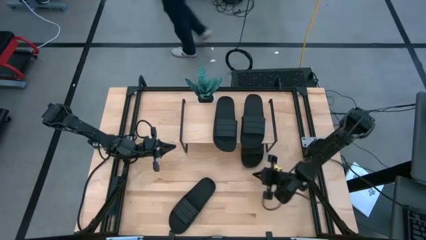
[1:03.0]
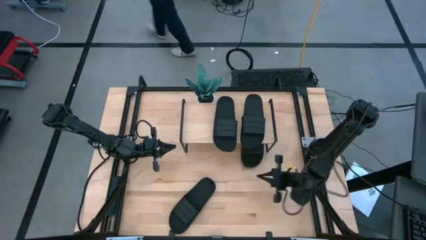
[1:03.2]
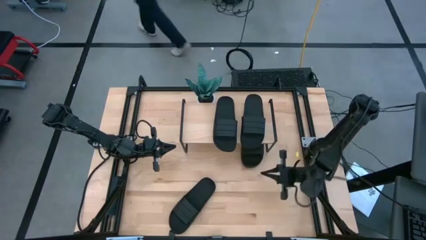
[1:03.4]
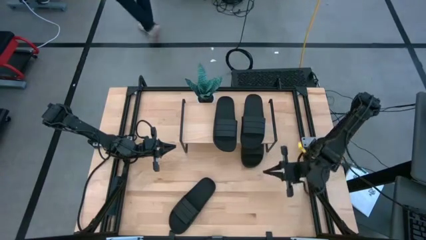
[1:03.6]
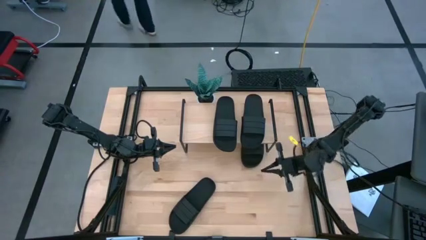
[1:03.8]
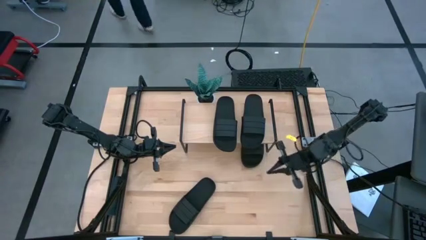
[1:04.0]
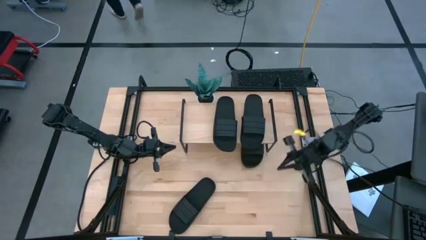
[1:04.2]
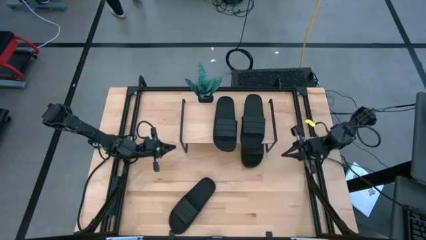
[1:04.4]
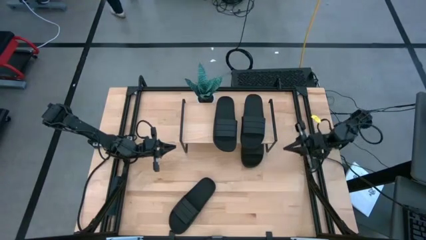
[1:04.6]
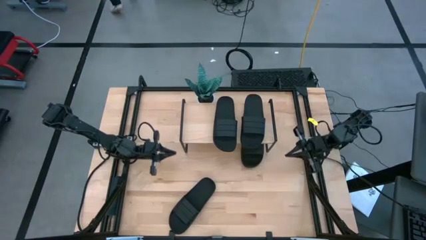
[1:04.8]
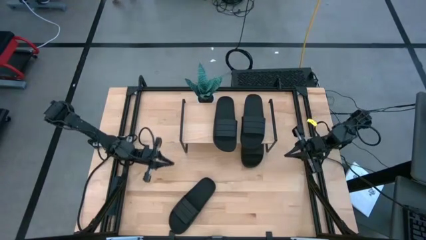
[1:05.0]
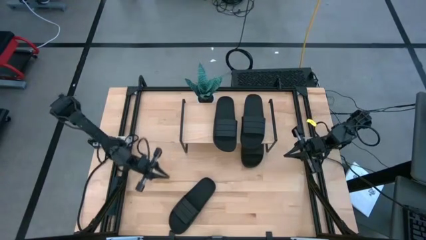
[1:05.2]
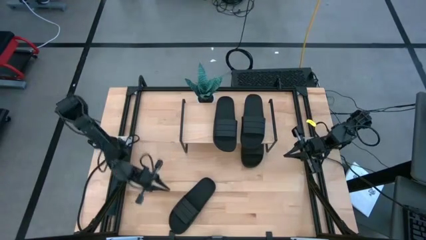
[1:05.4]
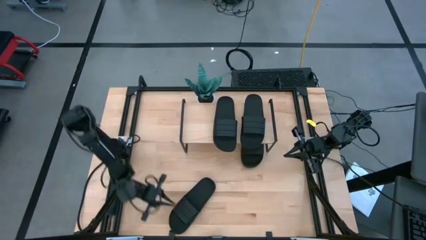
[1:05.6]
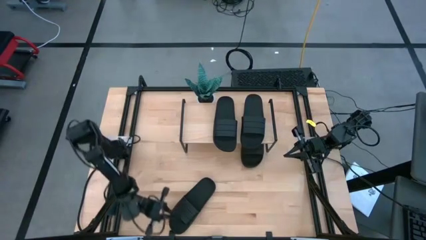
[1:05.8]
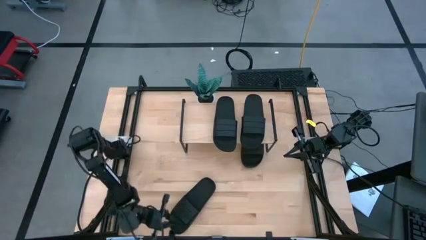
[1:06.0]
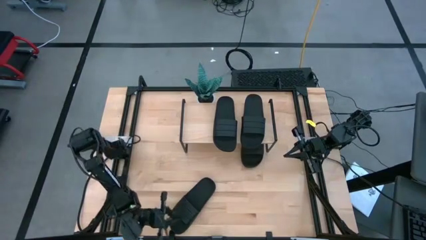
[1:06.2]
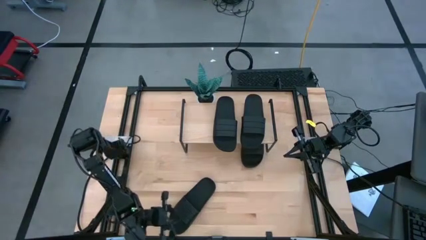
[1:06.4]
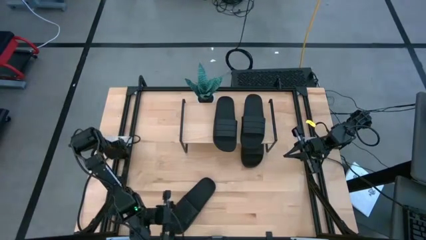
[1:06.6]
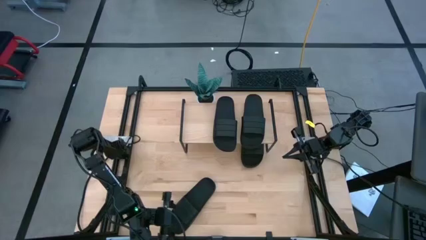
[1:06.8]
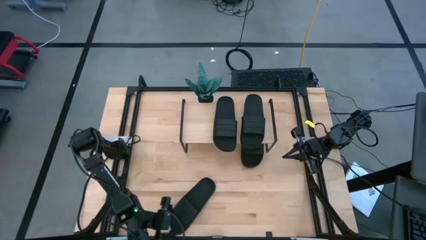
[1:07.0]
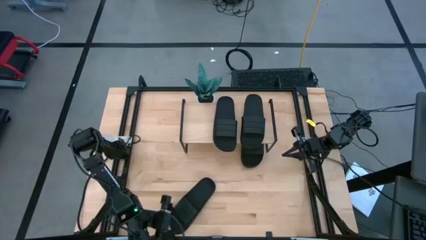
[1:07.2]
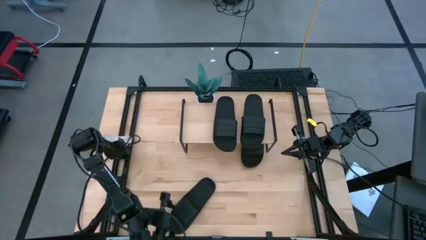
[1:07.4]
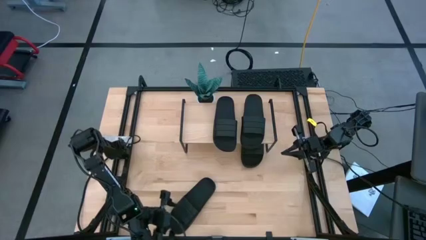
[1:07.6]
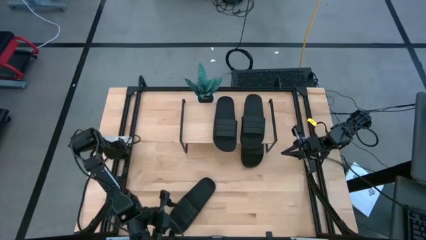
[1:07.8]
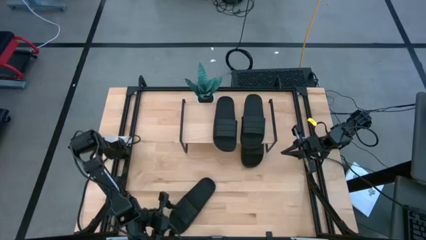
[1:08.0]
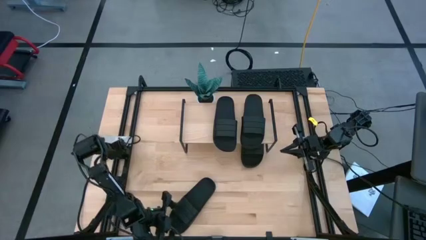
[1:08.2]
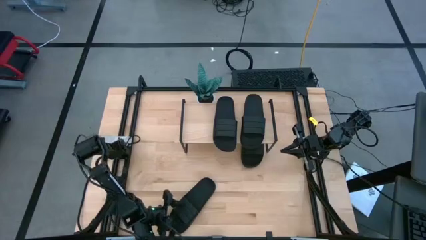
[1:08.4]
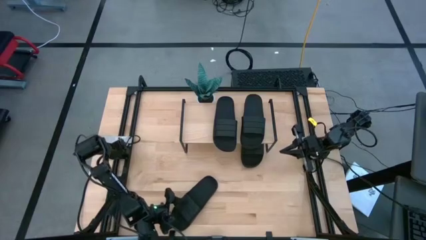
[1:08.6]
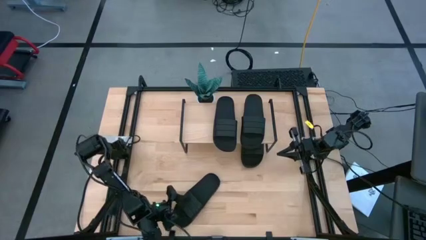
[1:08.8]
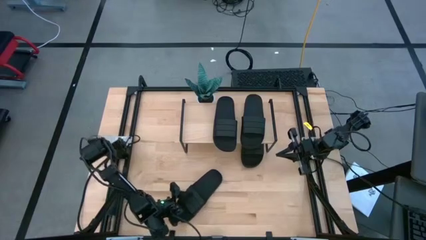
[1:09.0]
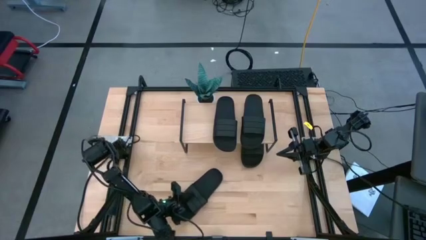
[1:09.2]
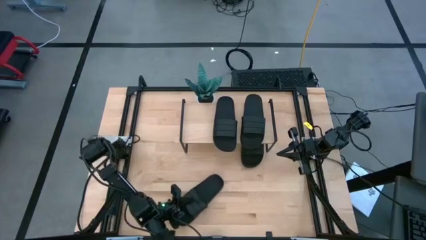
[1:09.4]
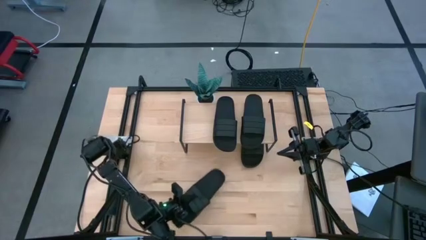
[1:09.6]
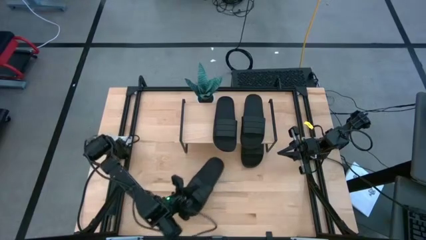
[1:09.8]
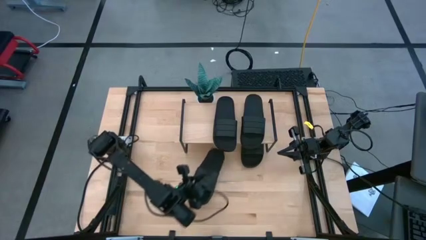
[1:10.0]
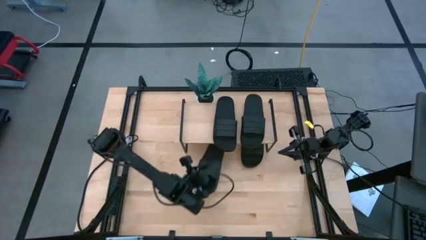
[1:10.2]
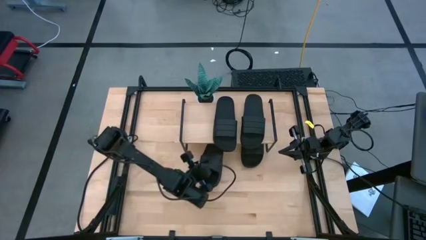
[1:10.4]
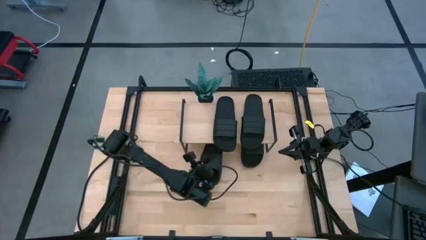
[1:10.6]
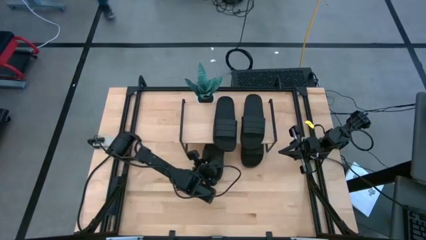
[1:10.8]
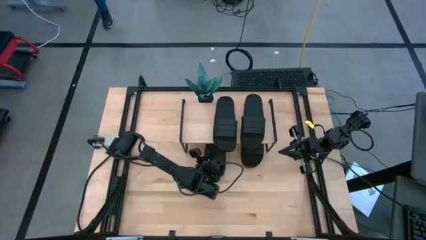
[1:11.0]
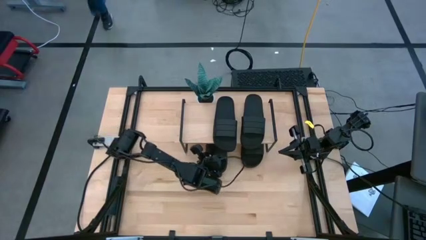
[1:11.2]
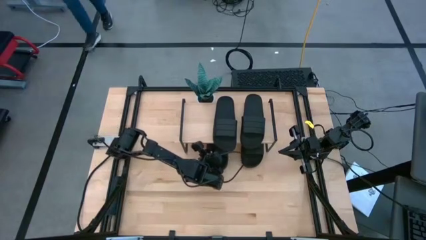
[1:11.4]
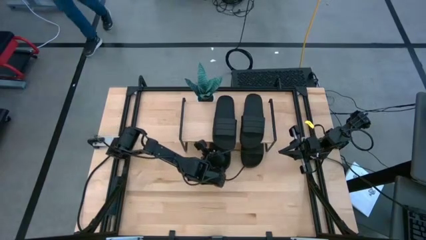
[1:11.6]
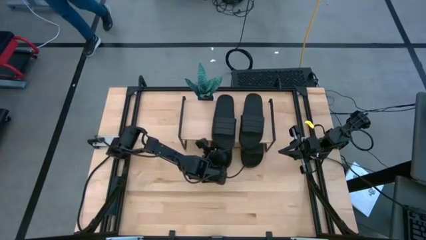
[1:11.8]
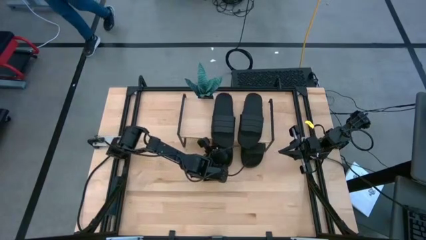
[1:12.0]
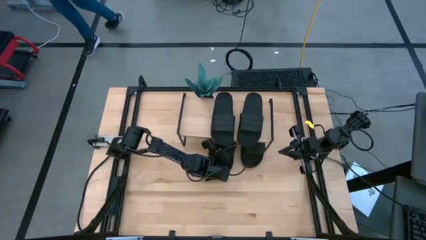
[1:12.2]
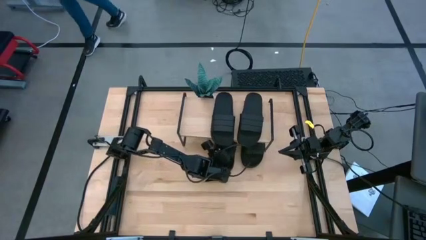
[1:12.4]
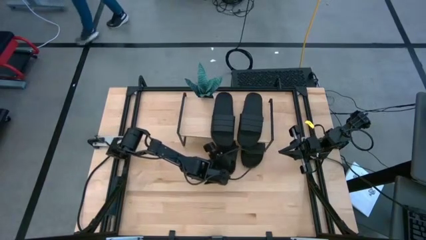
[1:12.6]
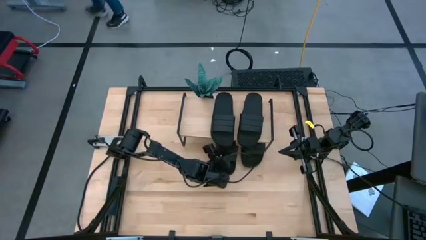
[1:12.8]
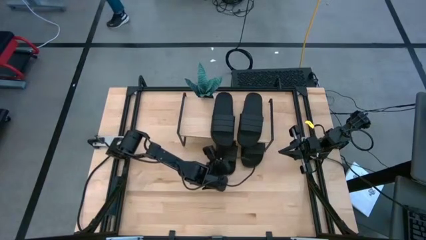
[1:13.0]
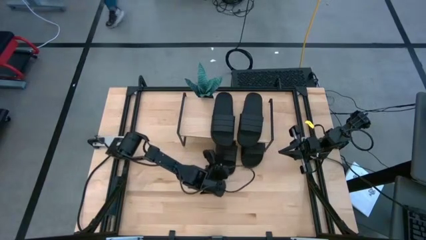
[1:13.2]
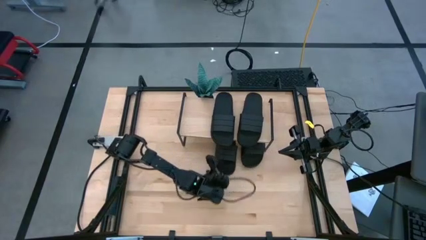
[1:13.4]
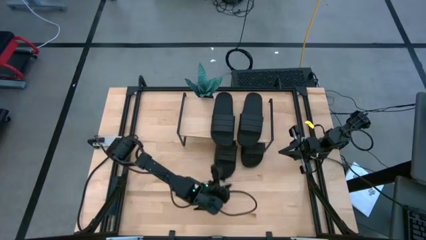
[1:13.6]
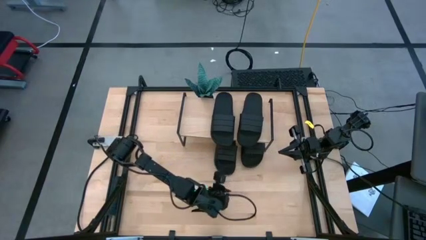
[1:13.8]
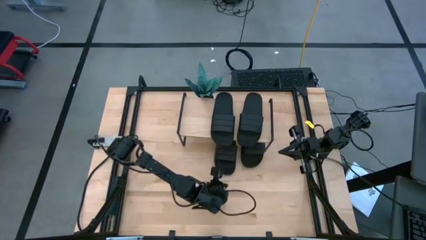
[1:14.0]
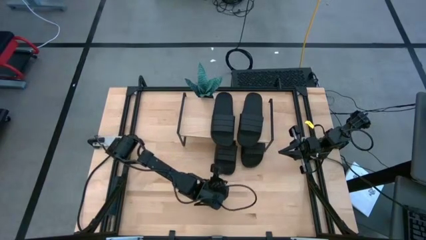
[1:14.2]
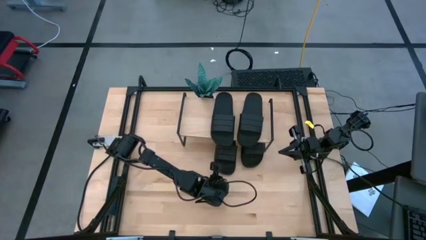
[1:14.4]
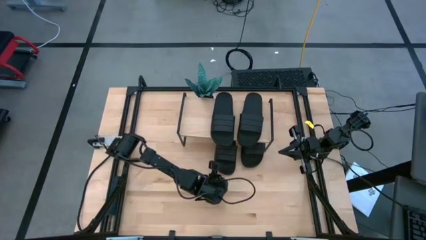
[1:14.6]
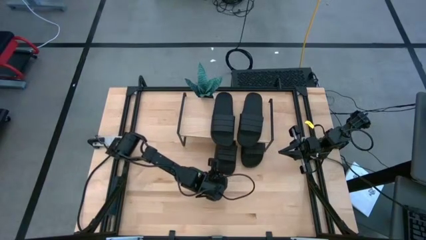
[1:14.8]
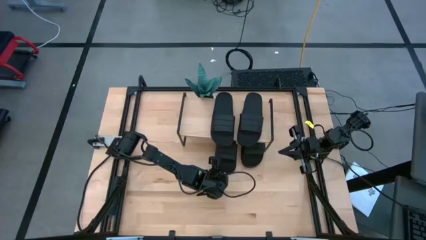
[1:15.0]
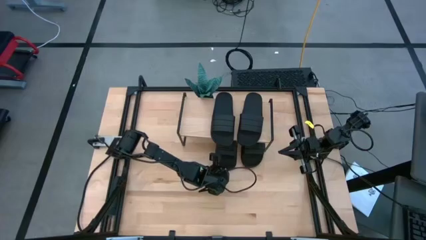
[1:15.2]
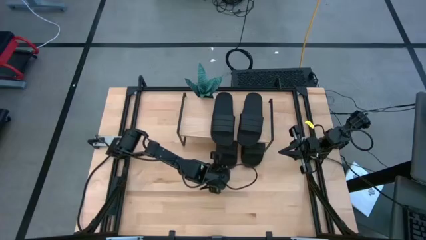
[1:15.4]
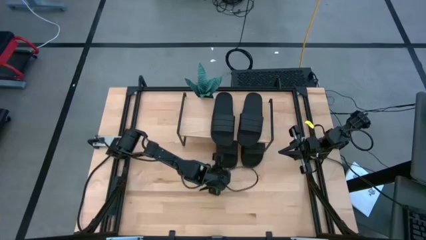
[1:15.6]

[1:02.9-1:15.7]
Task: Pick and place slides into the shelf
Put the slide under the shelf

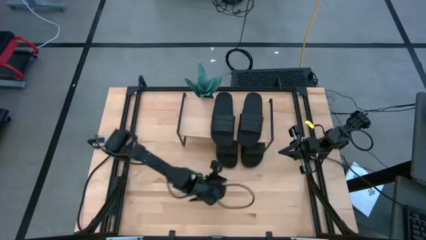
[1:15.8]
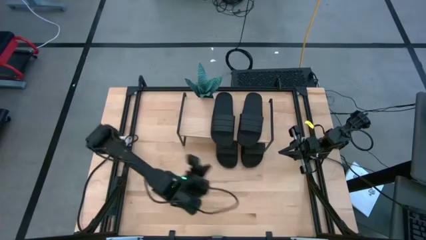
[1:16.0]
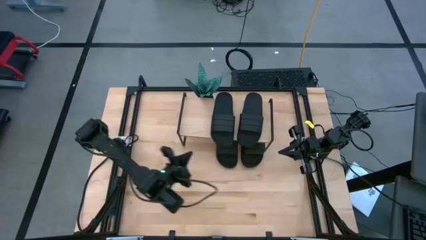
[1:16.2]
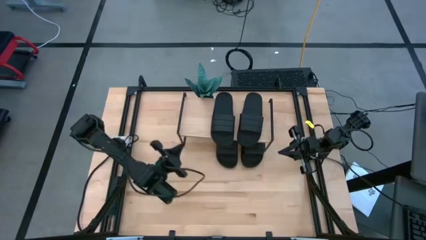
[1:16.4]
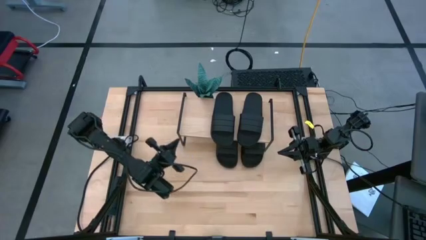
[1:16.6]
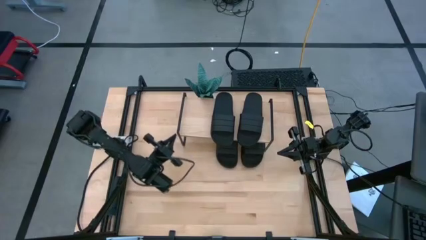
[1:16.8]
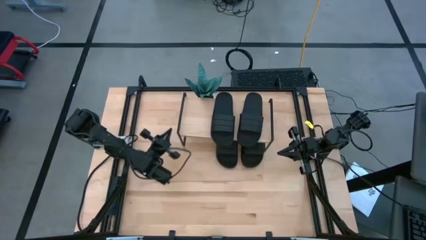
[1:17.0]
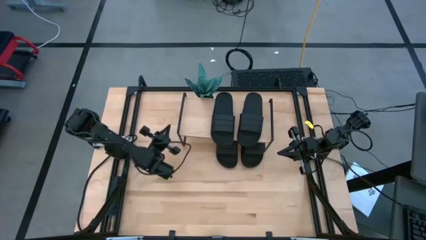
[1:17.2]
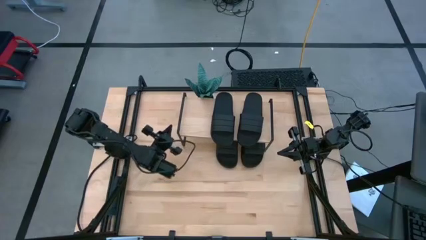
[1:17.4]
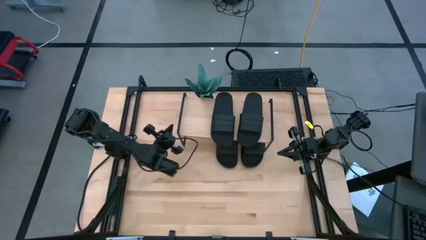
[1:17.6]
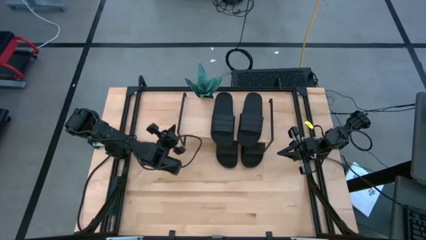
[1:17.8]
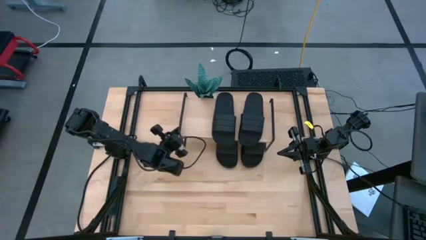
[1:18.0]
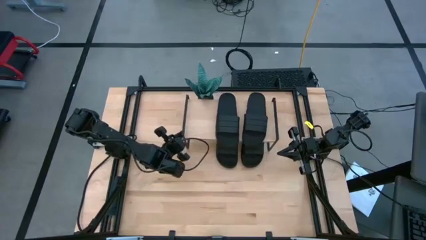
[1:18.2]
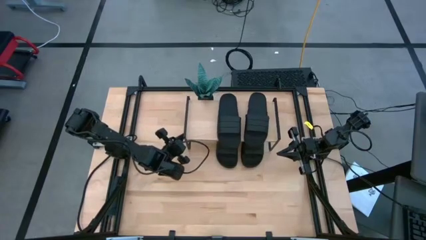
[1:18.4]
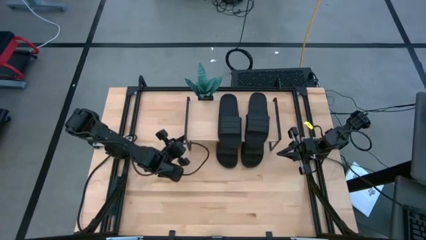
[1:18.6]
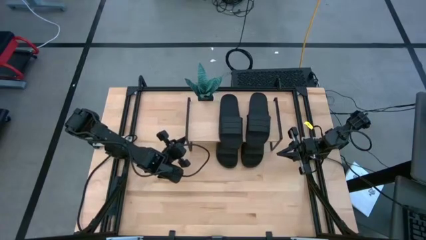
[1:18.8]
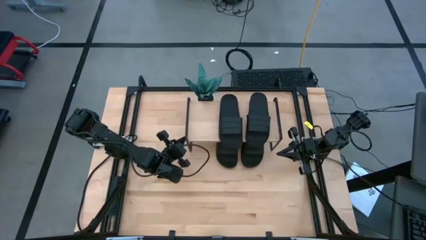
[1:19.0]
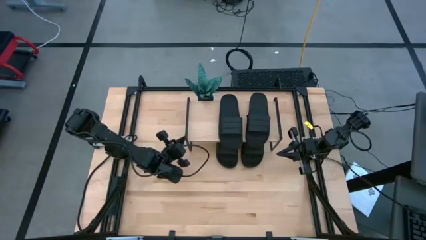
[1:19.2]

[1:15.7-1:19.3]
Adjust the shelf
